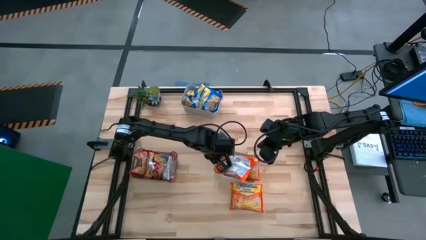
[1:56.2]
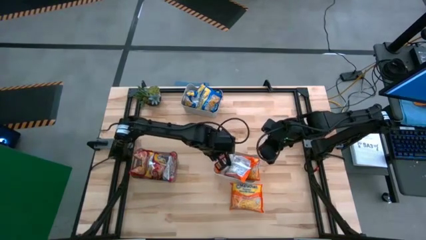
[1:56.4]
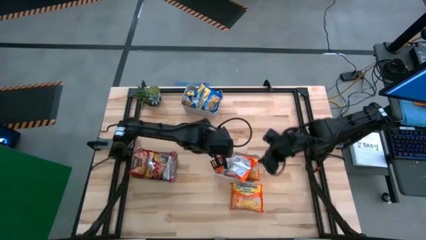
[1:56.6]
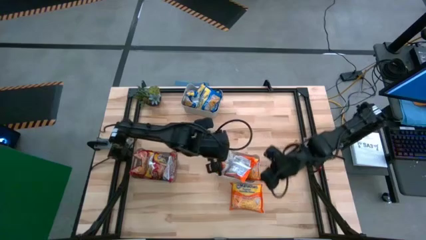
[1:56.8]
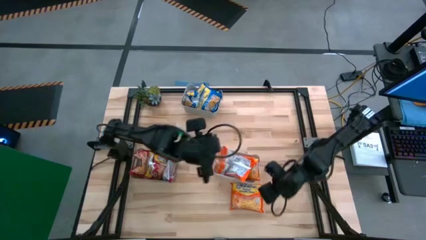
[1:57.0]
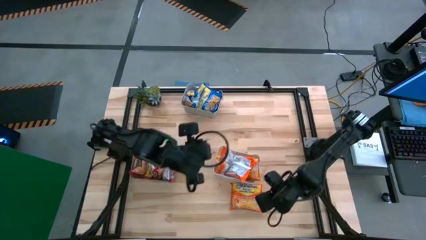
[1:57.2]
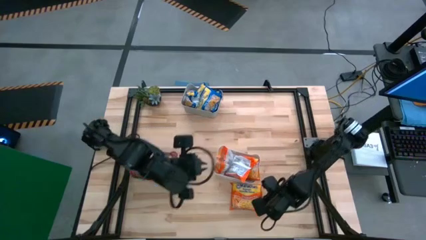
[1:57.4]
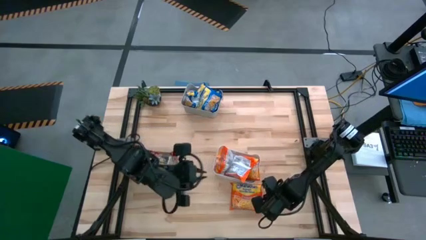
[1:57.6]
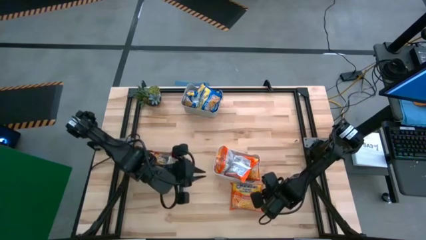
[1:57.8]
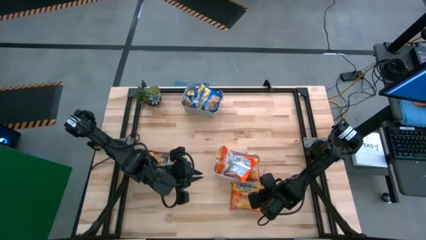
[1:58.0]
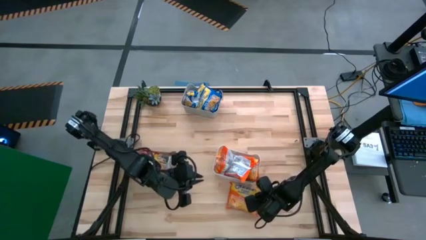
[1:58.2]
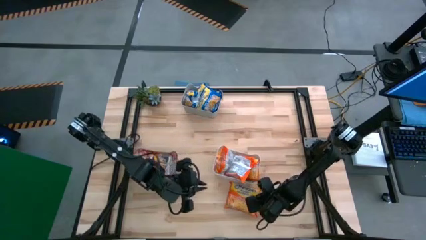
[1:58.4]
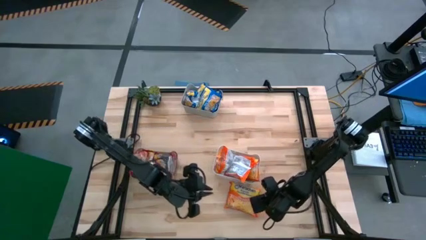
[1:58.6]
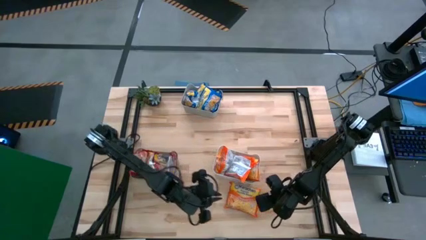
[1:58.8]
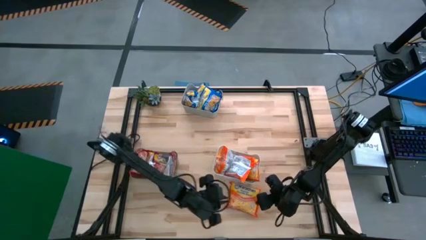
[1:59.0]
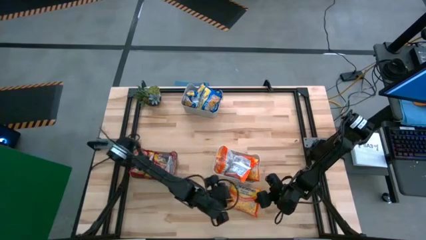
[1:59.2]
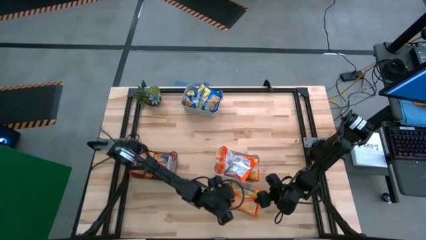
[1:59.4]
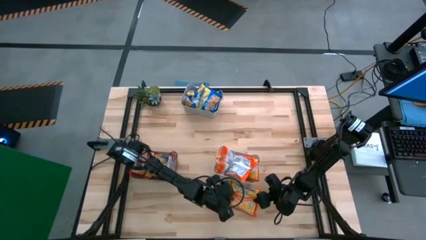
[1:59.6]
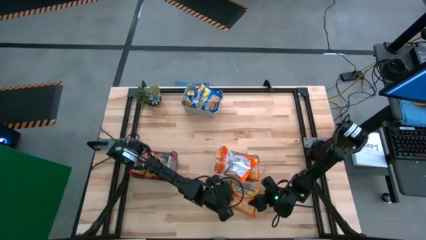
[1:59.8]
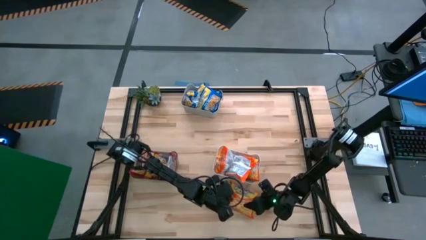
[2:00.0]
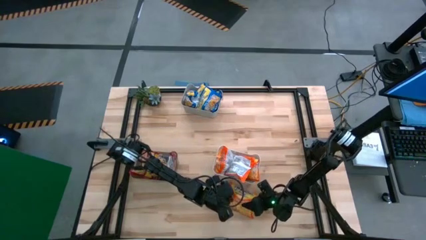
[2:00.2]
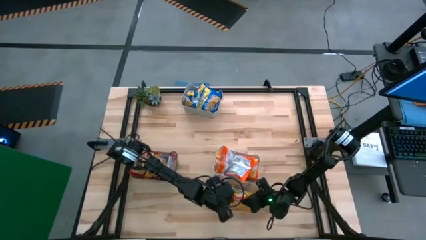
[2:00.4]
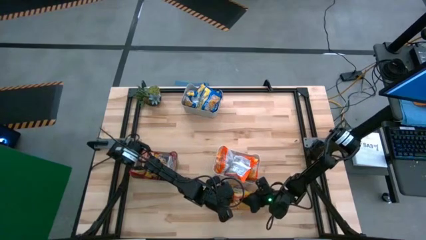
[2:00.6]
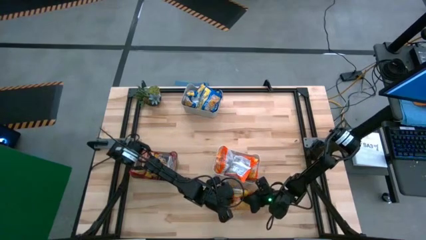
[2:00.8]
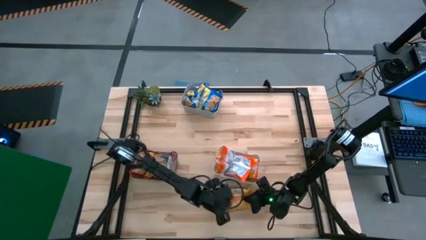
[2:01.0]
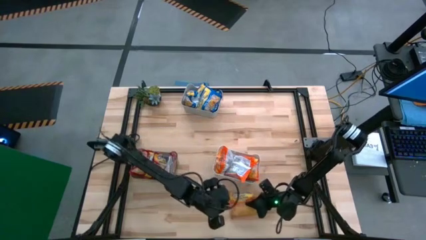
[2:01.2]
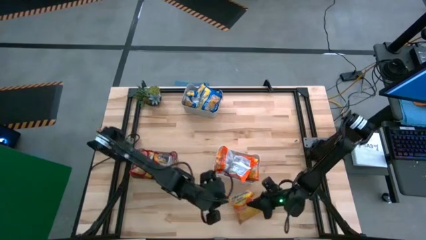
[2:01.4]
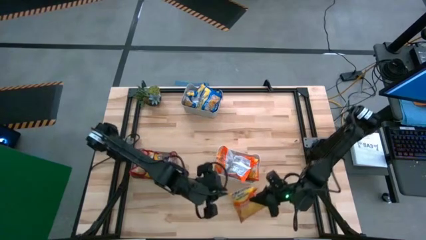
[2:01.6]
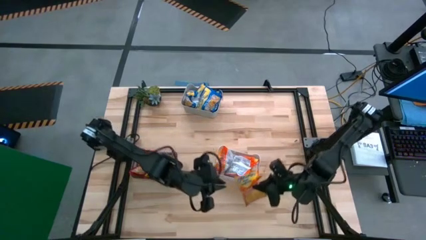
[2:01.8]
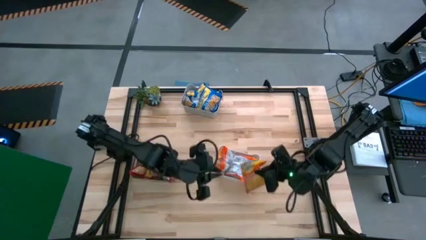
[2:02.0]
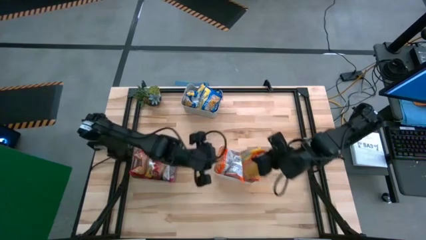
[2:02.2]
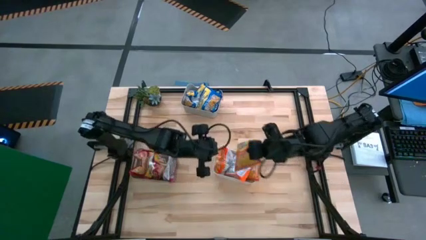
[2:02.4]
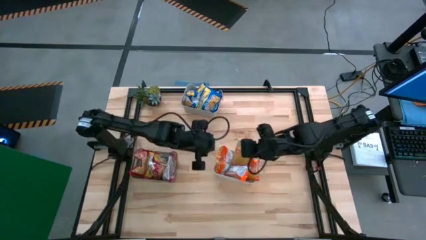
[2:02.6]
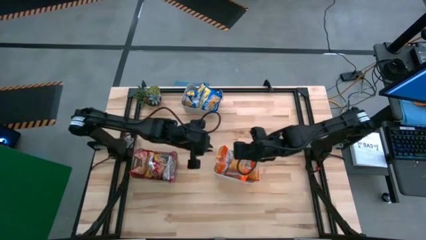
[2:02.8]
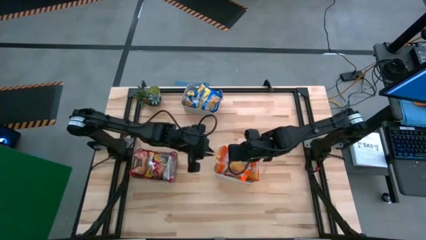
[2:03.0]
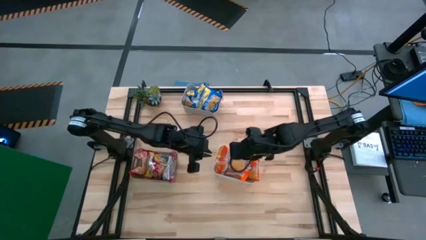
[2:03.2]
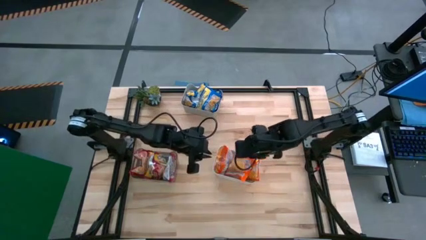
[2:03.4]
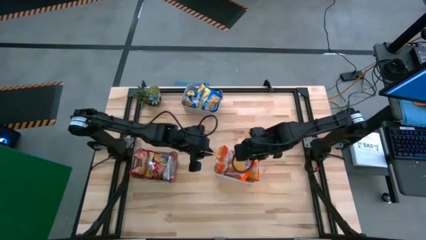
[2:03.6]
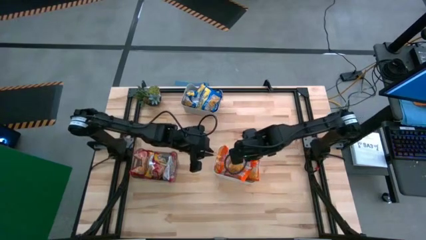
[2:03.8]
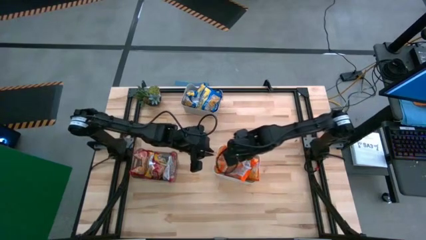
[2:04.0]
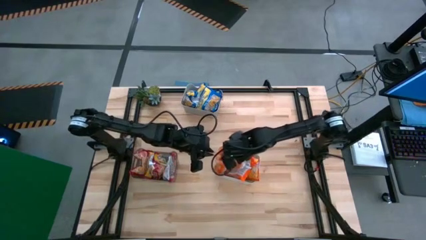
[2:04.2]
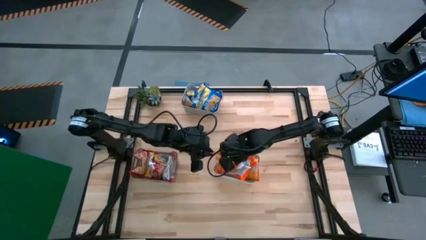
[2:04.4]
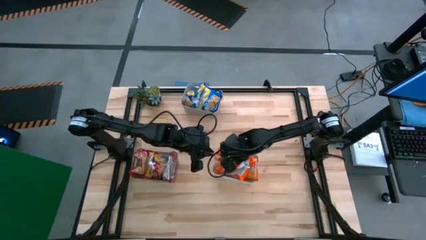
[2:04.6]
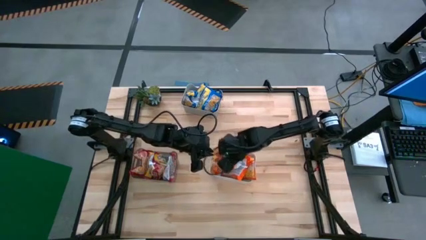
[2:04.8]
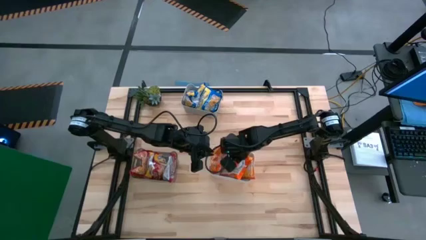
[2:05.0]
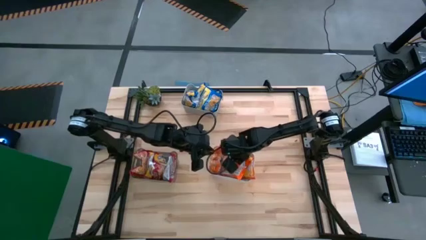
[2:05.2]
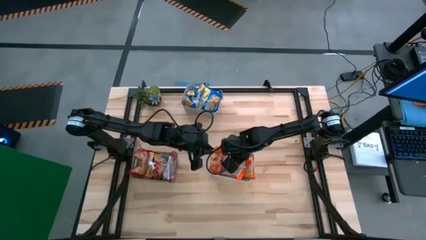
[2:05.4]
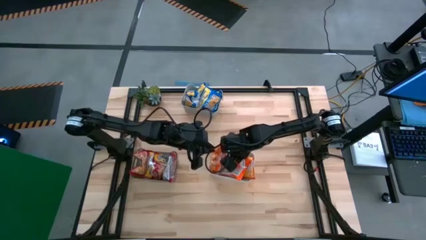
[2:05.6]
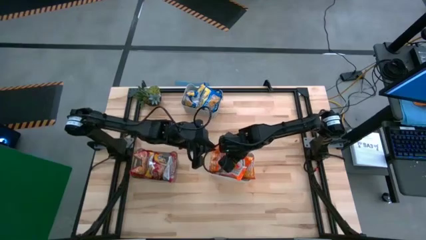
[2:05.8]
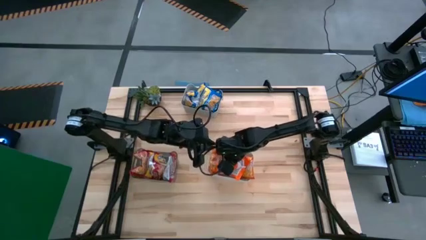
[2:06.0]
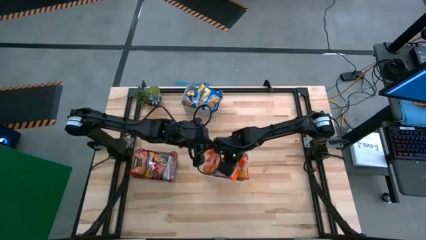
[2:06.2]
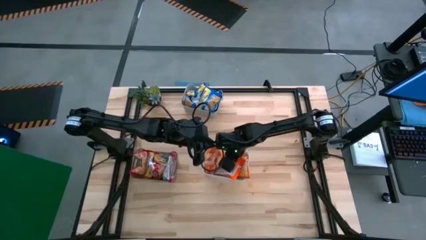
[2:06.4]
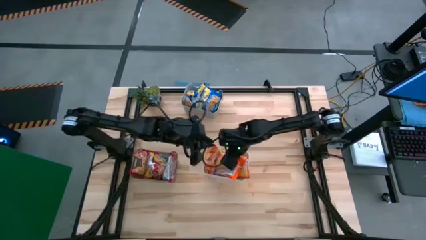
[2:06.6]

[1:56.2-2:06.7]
Task: Sort Maruchan noodles
Put the orange noodle pack into the white bin
